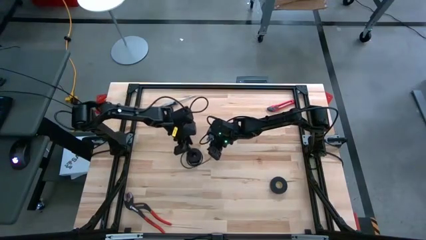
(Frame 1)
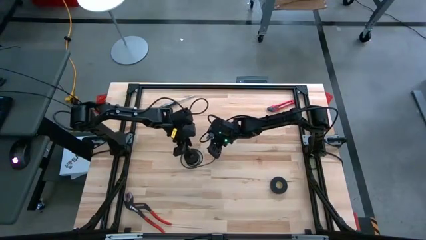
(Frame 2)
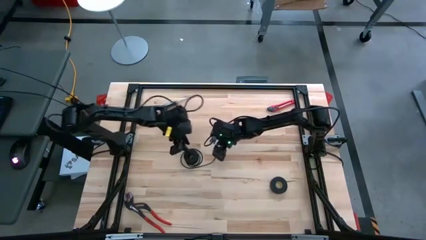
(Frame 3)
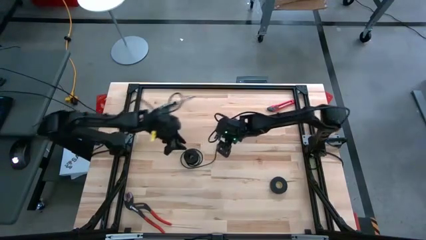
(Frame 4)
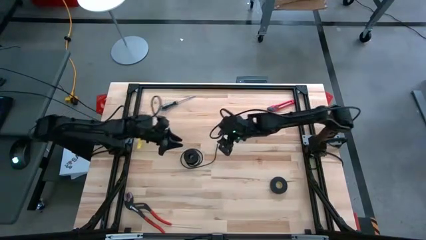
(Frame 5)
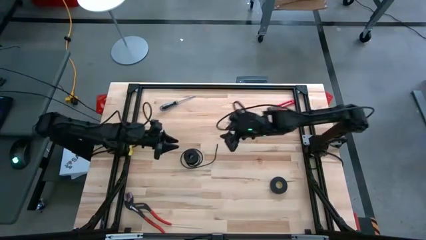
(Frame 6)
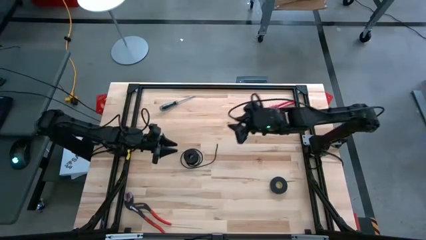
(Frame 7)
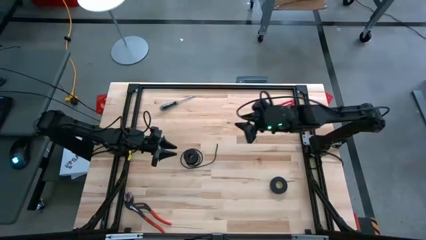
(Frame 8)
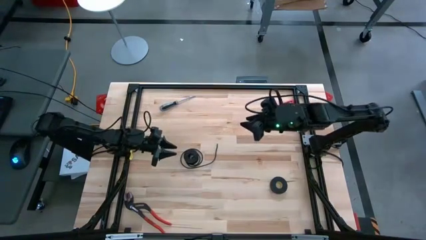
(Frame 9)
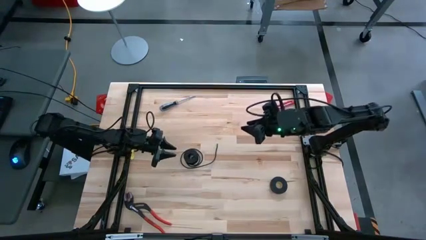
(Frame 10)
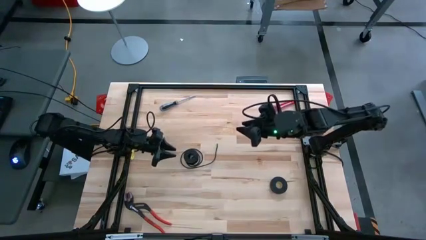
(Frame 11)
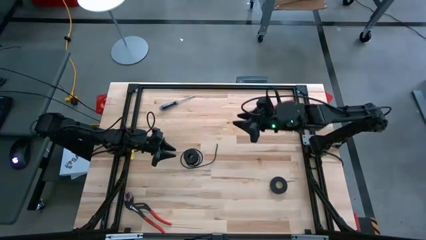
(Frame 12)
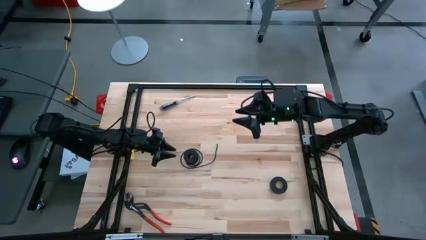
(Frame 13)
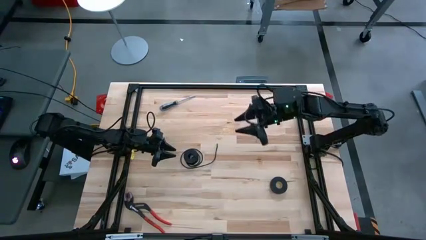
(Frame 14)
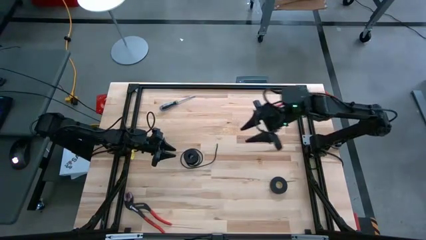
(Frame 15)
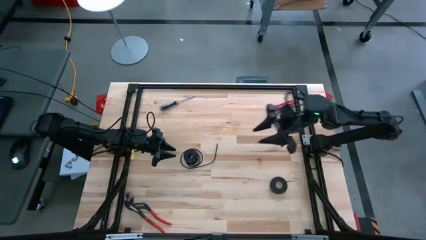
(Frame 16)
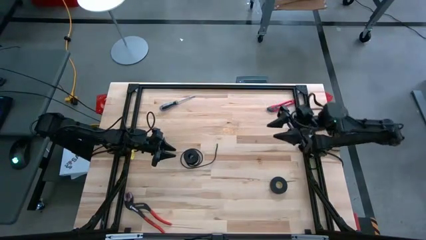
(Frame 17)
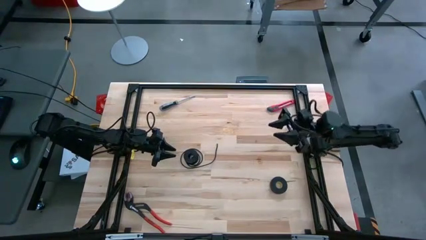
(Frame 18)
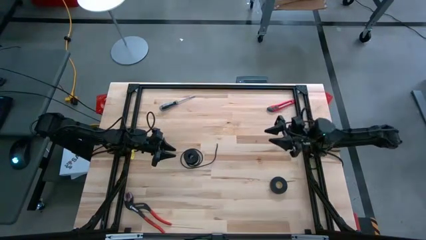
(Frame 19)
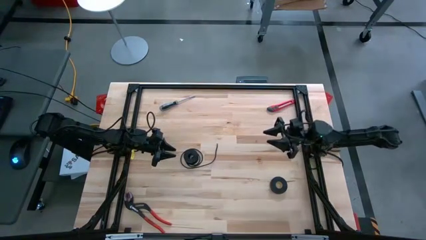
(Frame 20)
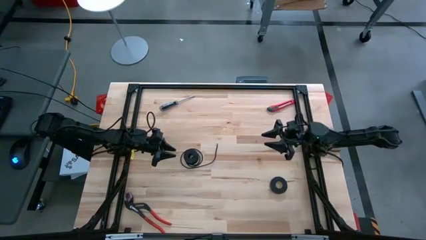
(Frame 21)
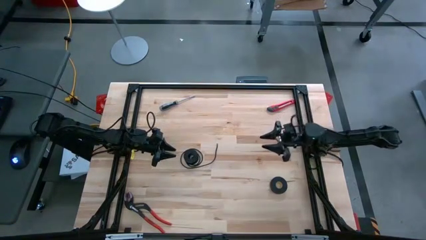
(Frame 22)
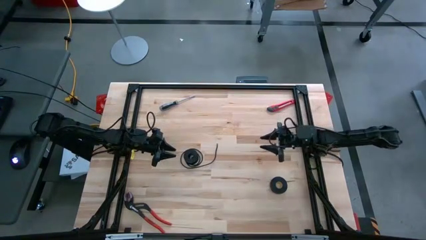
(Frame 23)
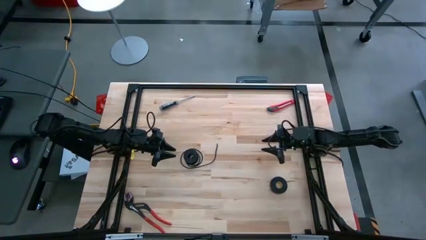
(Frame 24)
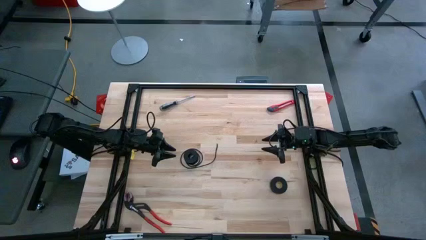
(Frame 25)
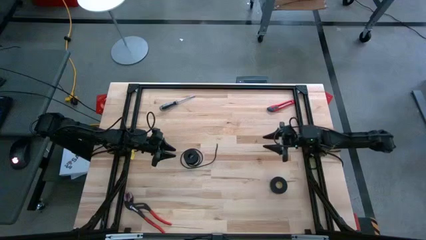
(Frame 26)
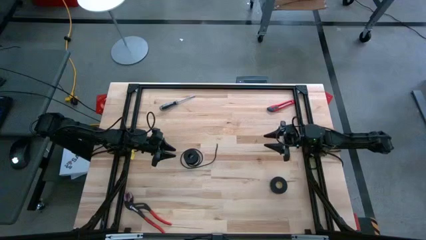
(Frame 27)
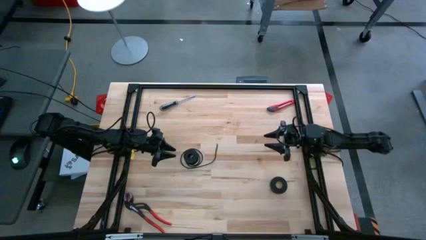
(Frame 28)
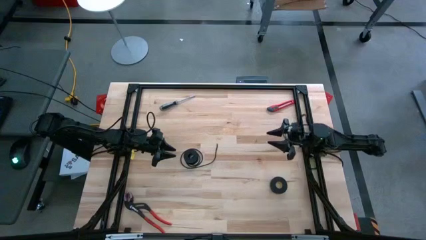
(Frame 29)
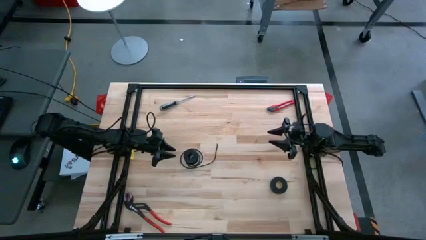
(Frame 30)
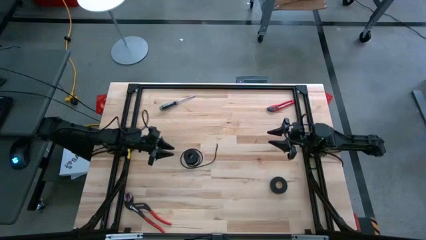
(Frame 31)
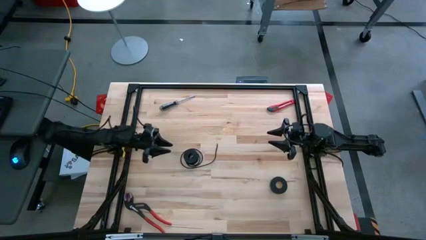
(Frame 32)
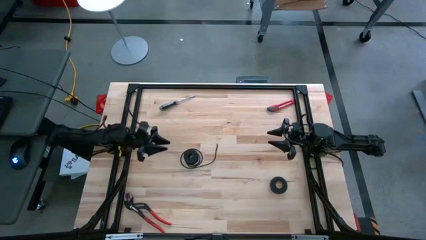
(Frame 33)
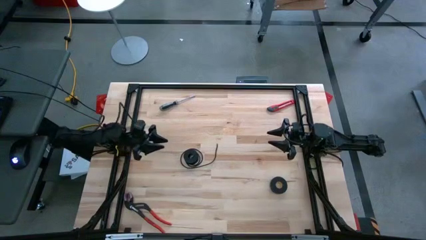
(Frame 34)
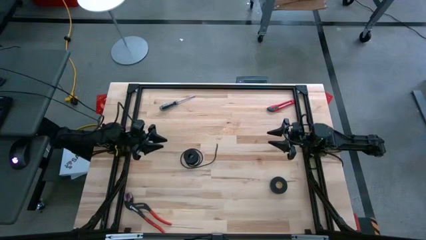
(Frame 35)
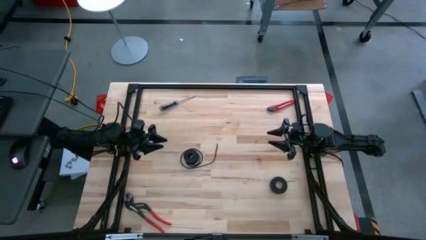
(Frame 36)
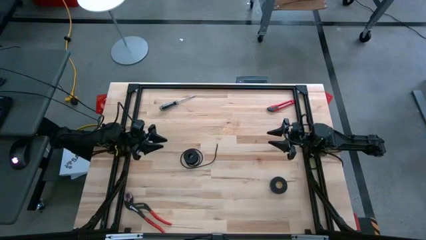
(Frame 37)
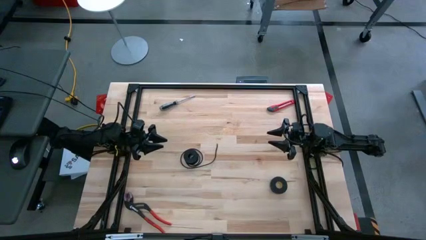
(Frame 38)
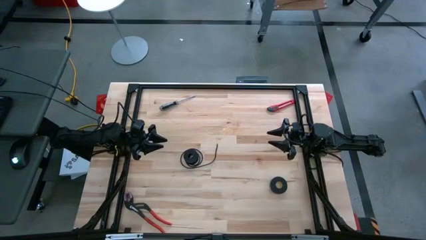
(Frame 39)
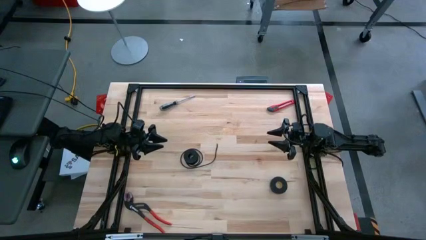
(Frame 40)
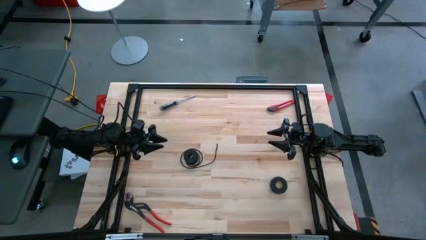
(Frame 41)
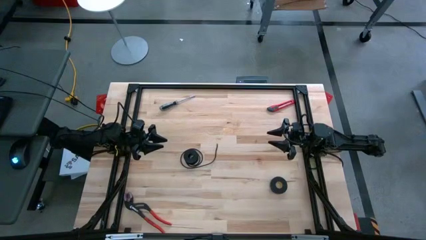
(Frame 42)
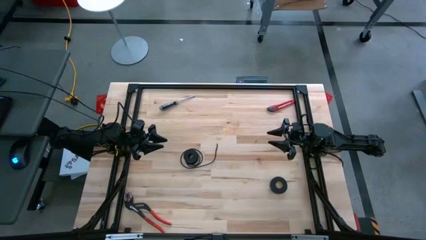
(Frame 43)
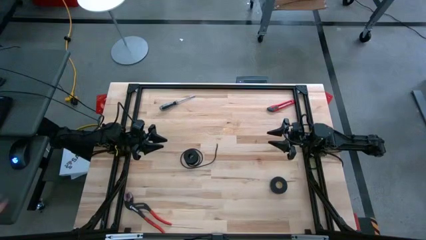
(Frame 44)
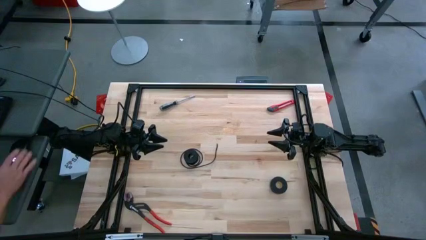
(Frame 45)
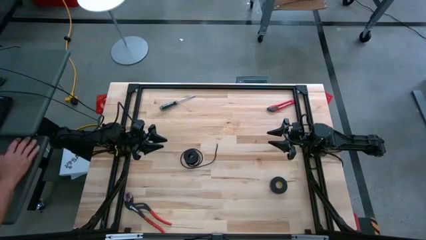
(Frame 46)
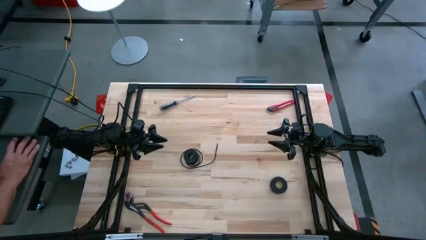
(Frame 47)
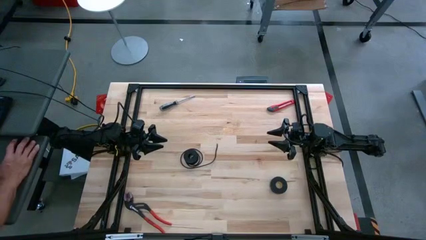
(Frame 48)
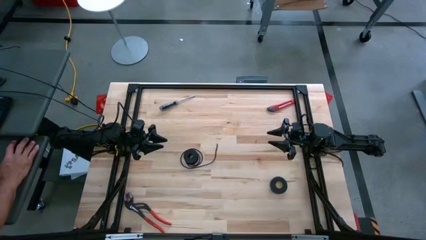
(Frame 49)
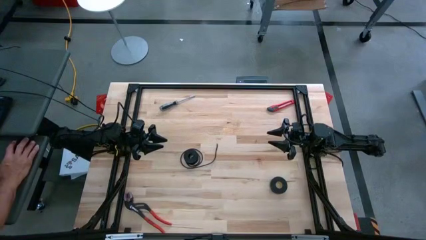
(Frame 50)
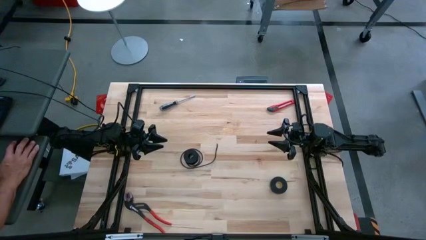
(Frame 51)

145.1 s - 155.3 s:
Task: Coil cords
Return to Home Position

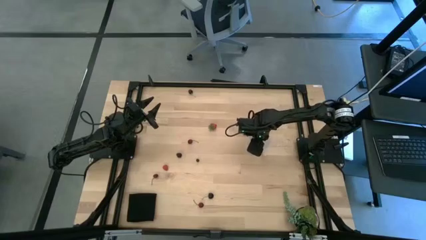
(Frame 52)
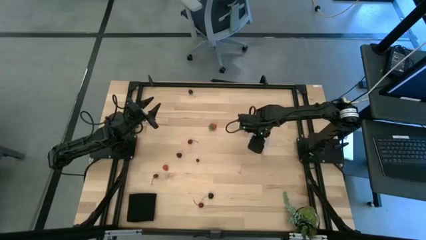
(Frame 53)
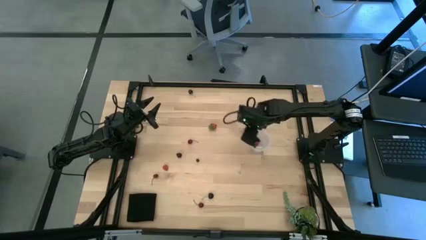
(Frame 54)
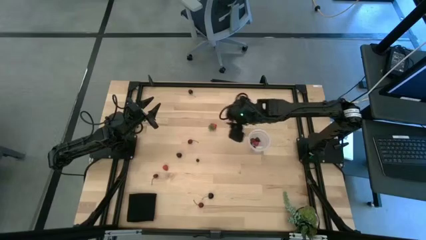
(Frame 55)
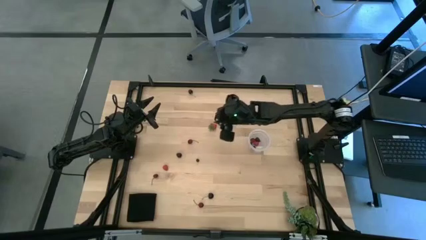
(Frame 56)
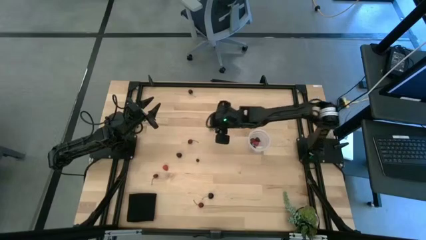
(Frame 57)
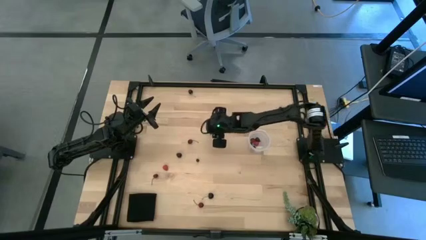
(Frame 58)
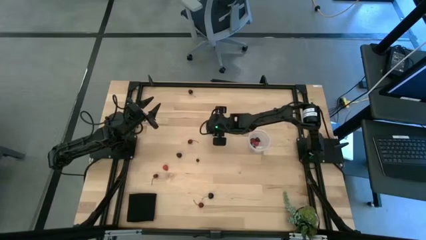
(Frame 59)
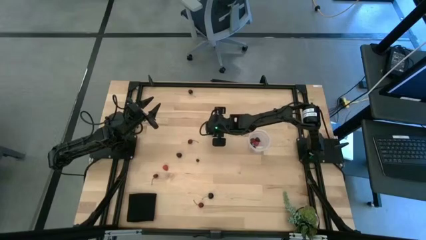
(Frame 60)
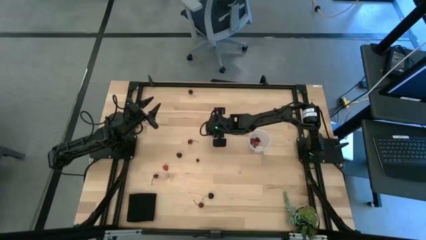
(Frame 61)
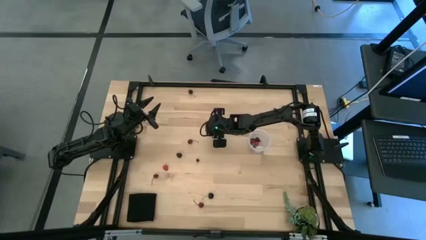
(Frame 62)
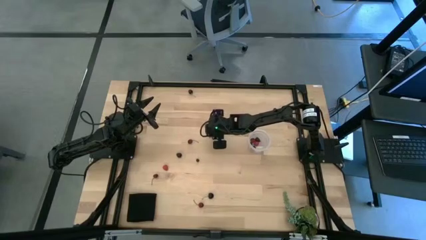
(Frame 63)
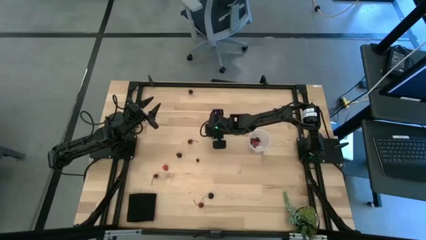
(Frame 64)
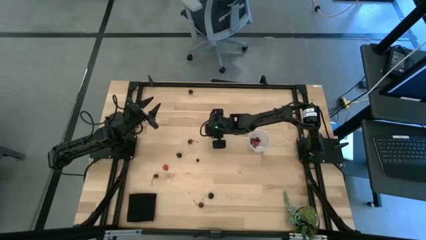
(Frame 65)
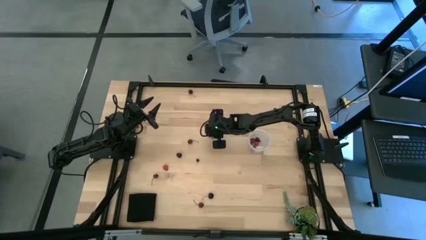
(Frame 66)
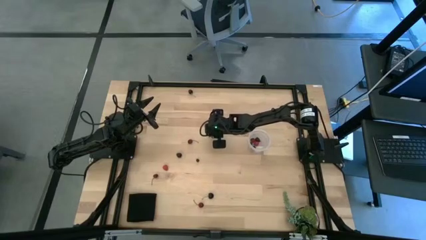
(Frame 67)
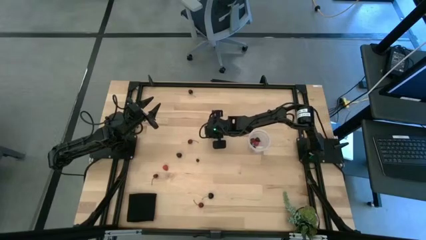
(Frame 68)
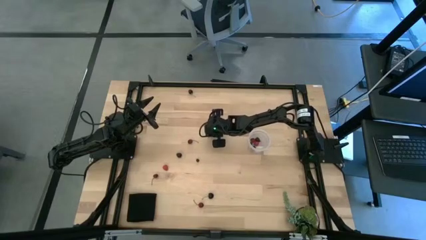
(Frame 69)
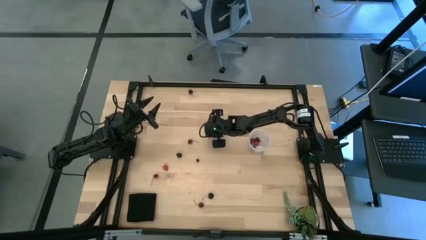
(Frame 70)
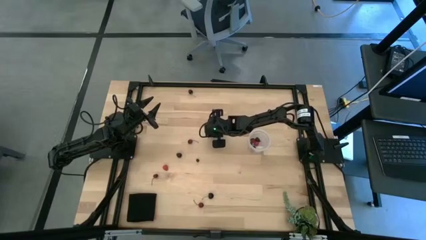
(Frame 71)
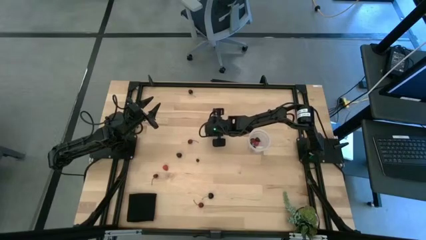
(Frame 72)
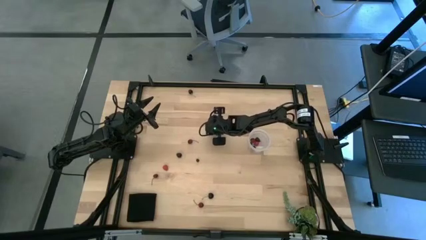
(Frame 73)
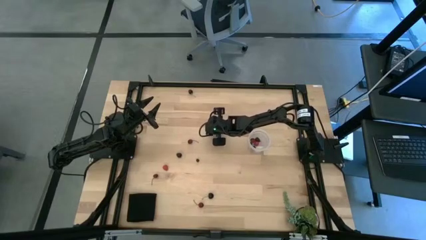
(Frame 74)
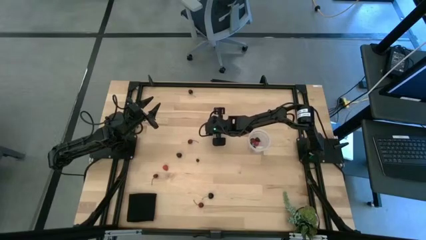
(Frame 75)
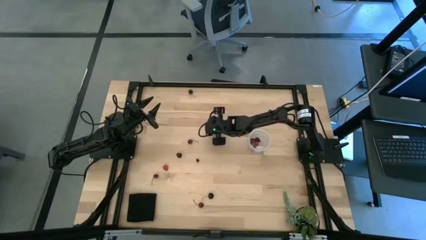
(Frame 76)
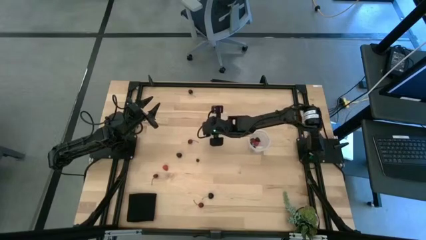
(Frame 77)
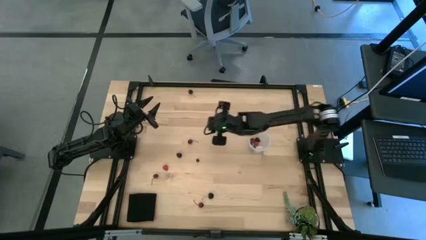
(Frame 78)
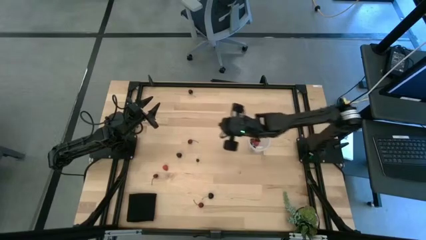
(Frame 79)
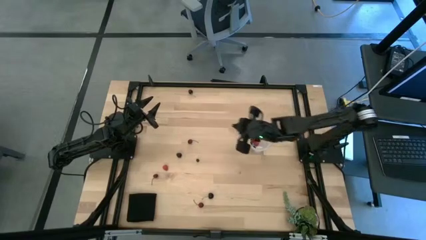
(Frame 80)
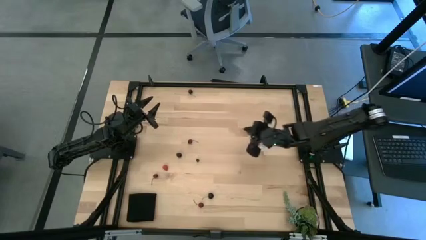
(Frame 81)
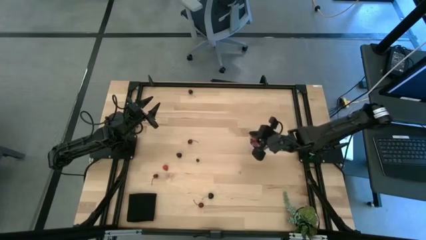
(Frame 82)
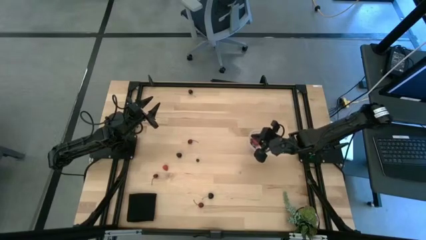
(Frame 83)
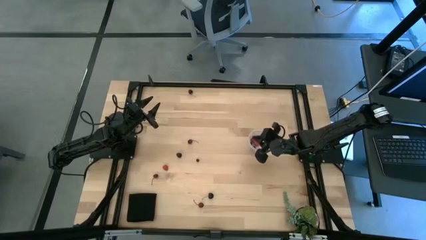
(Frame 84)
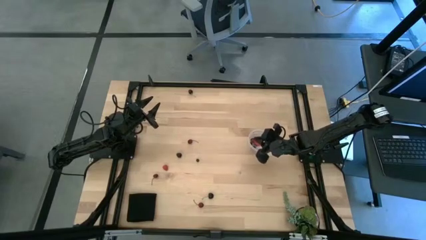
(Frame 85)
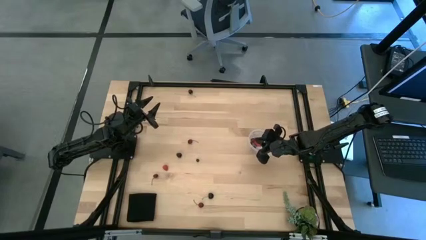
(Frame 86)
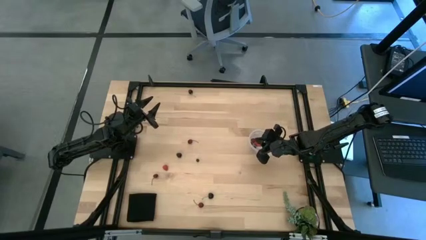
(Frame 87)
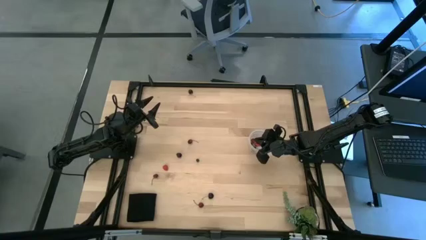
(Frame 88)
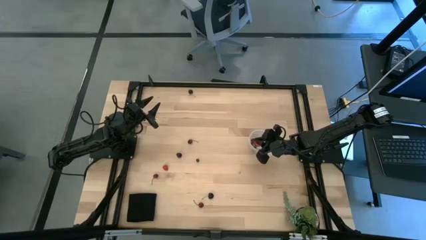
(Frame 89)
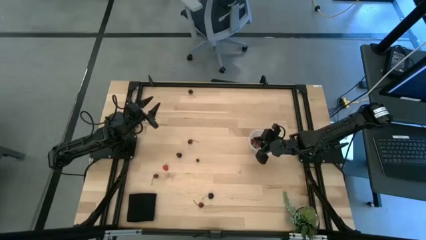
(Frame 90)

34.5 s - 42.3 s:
Task: Pick and placing Produce into tupperware
Put the red strawberry into the transparent bucket
